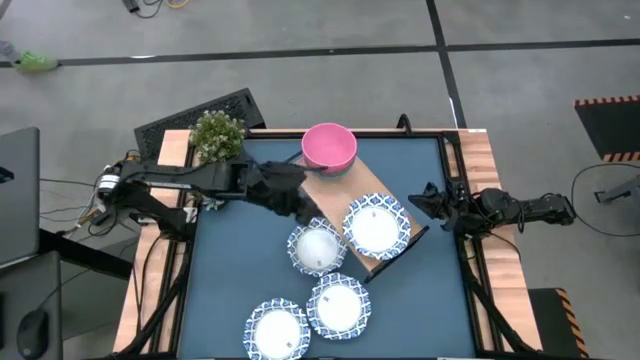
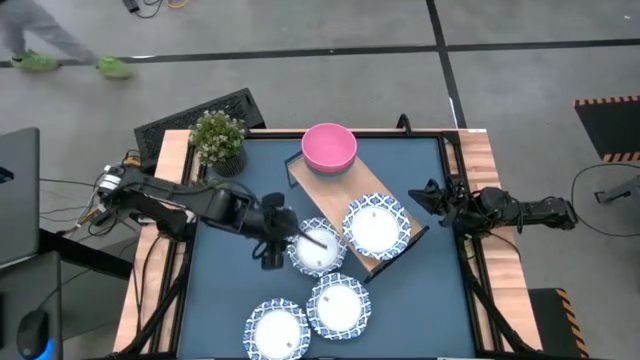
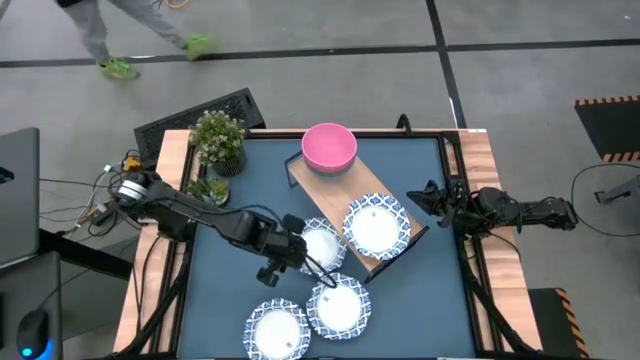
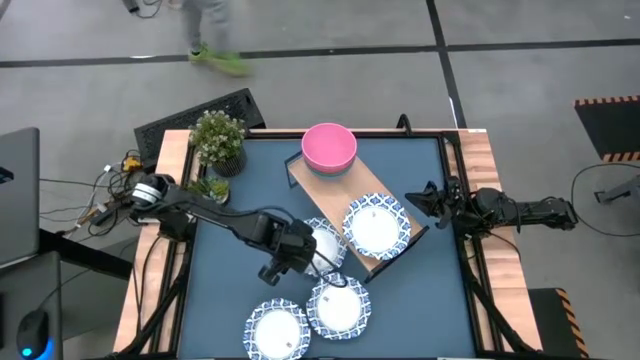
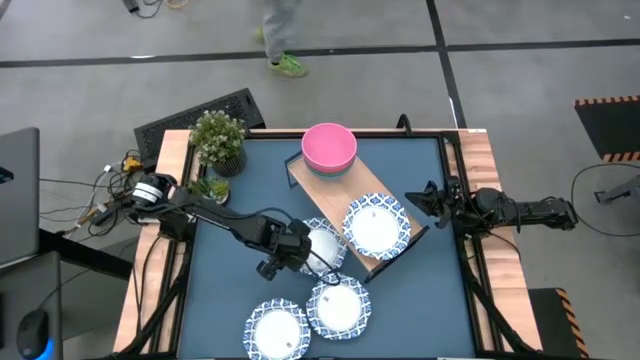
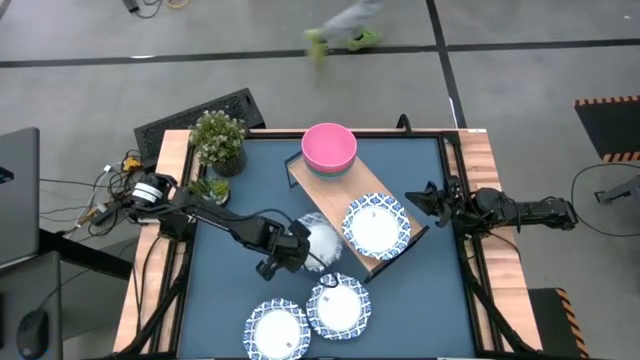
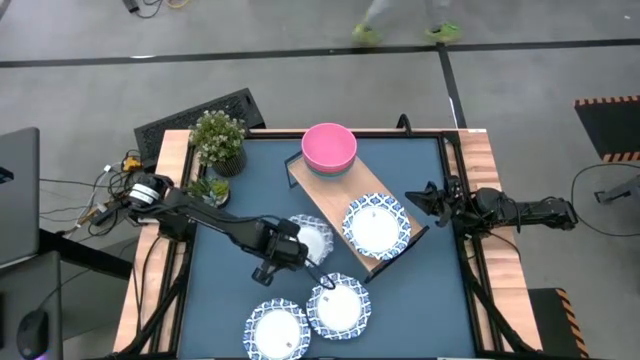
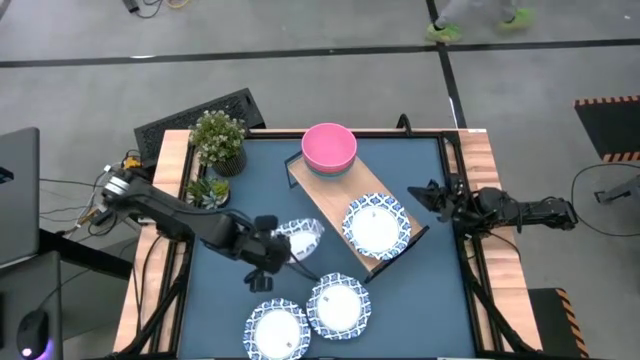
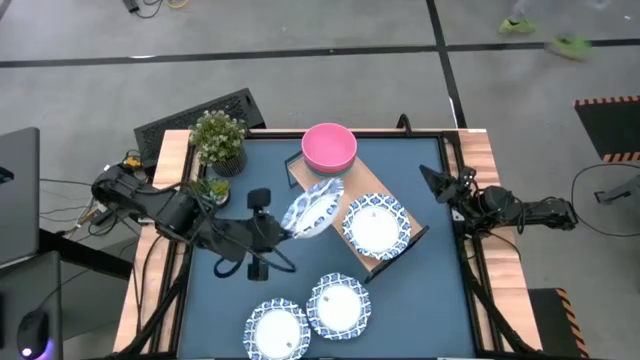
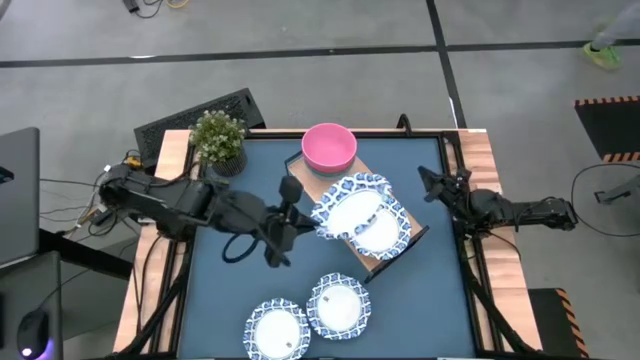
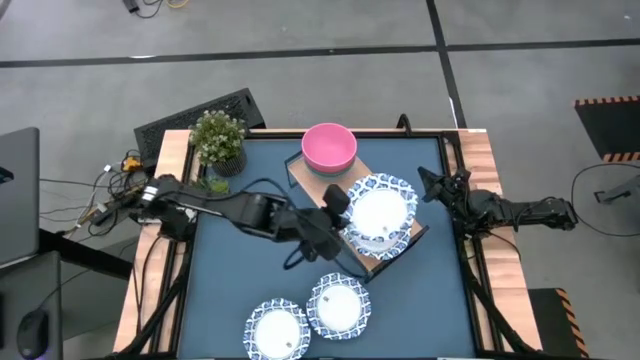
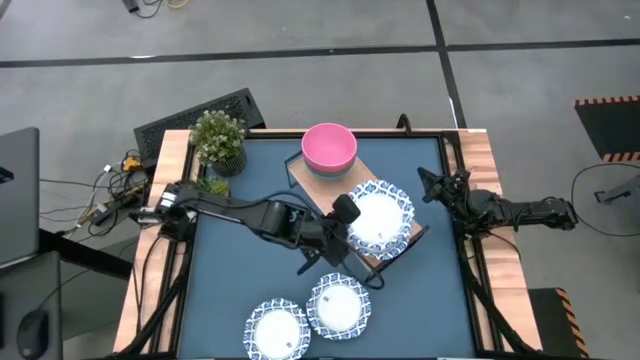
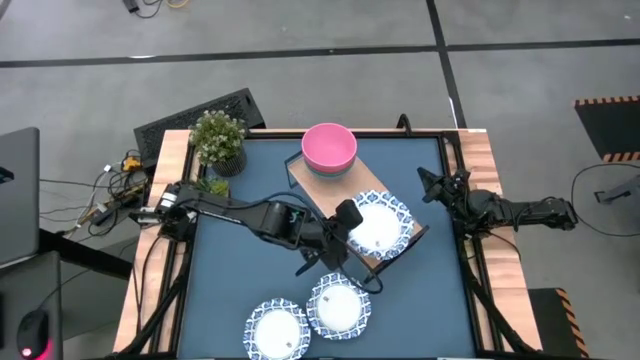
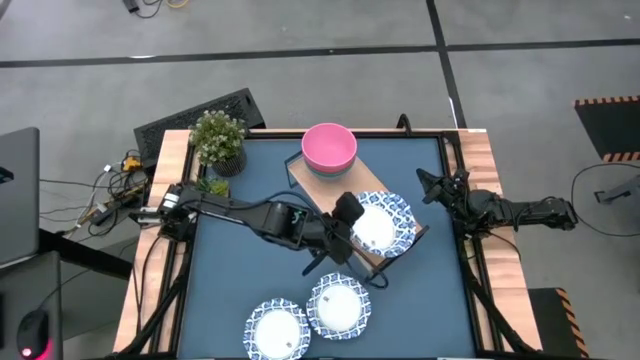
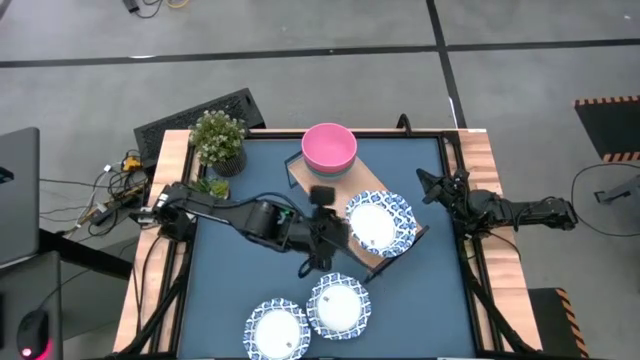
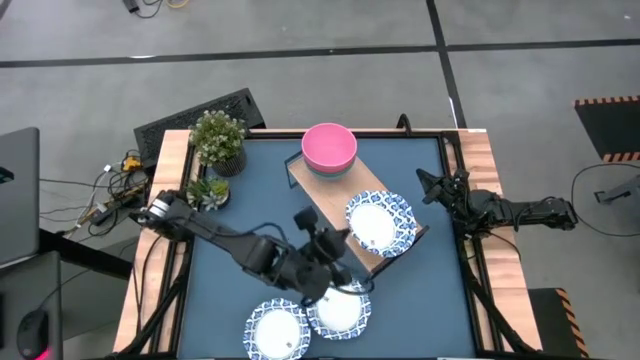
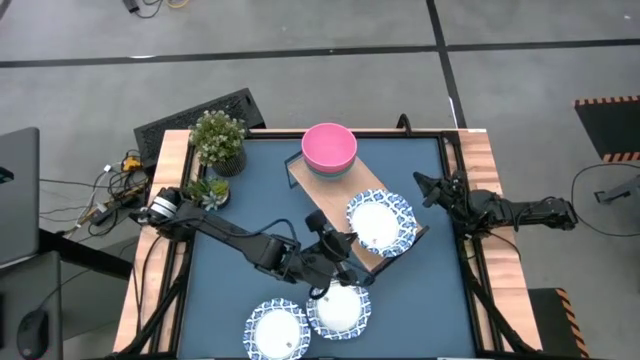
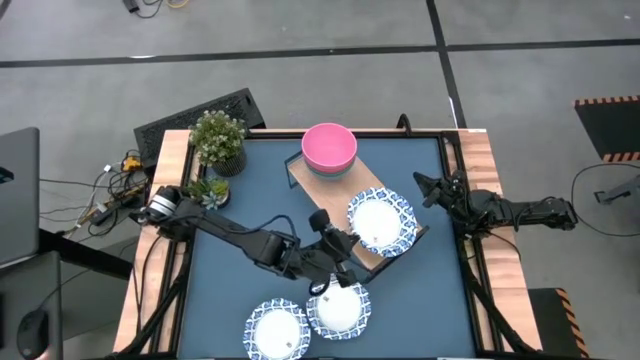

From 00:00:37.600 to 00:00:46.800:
Task: Place and stack plates onto a shelf
Stack the white and blue plate on the shelf

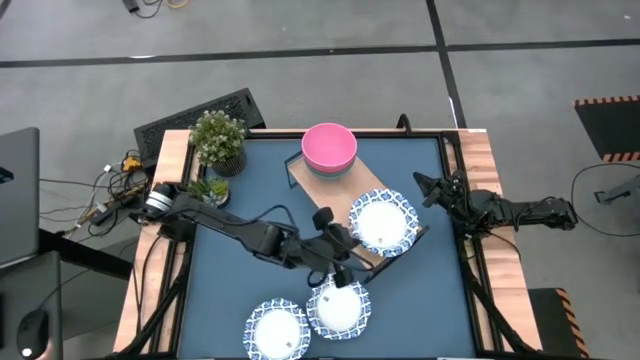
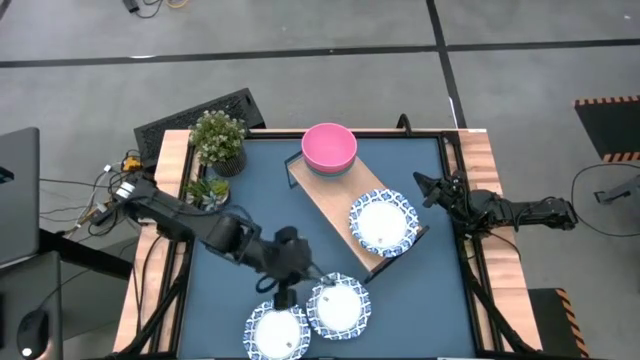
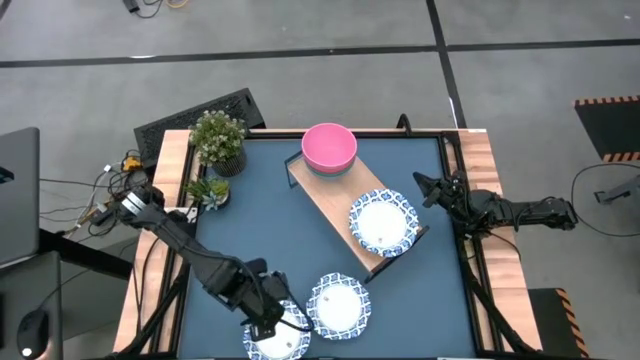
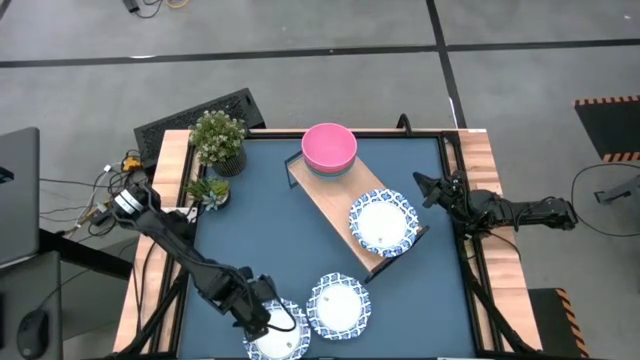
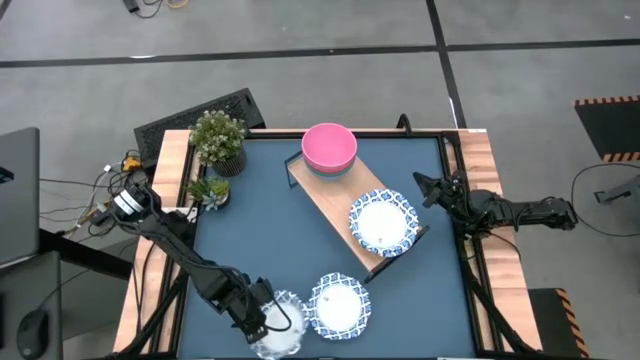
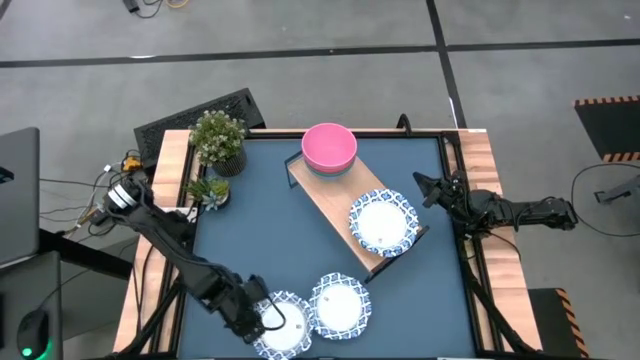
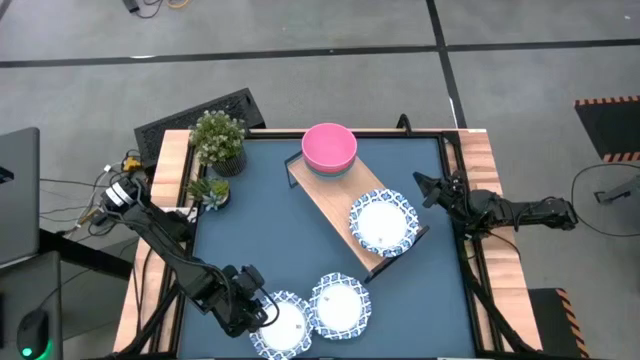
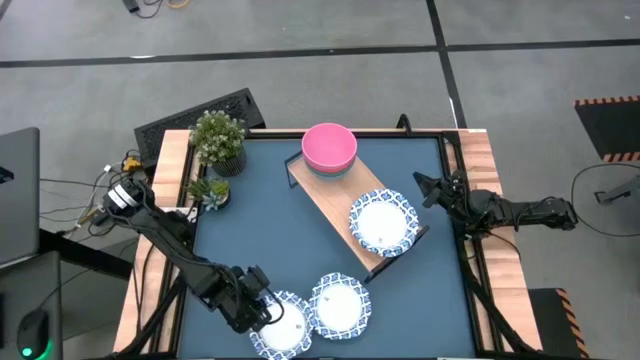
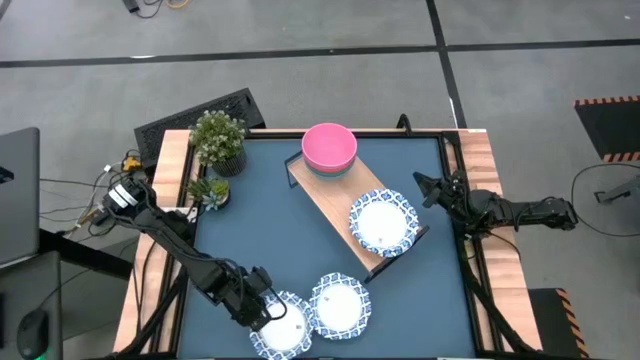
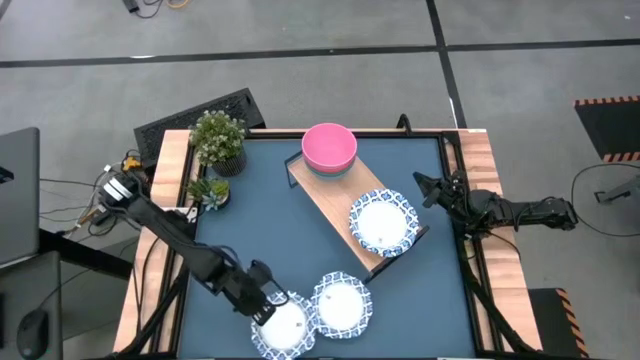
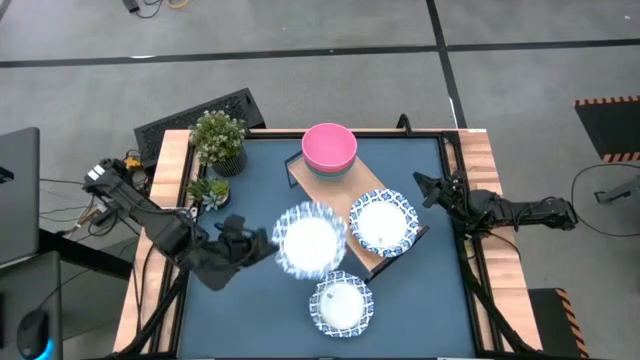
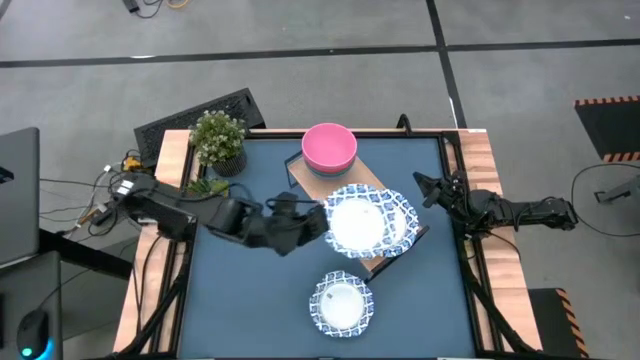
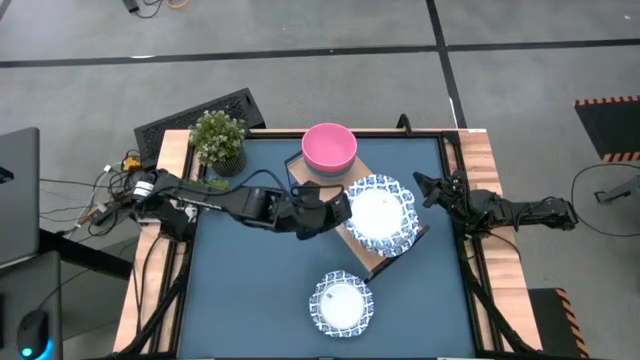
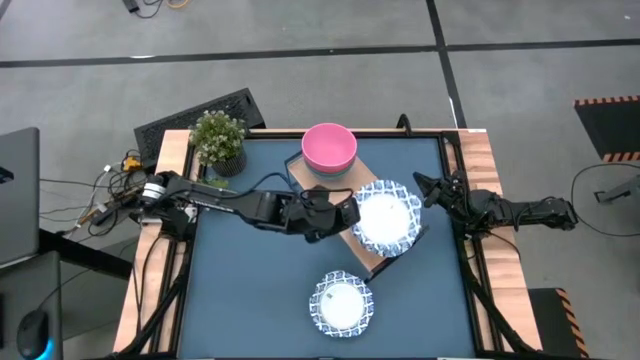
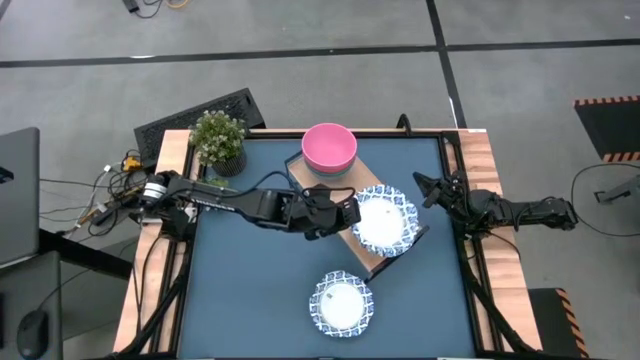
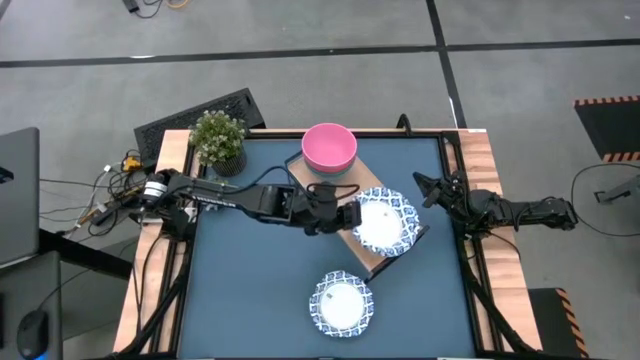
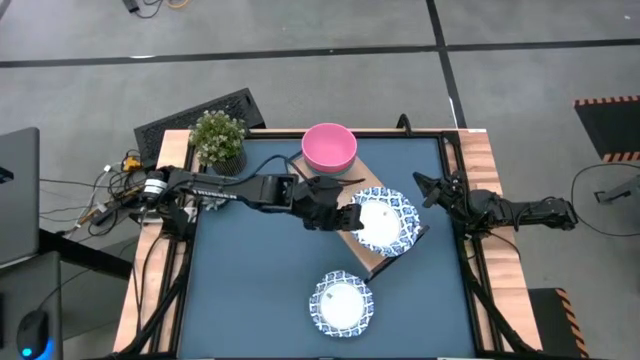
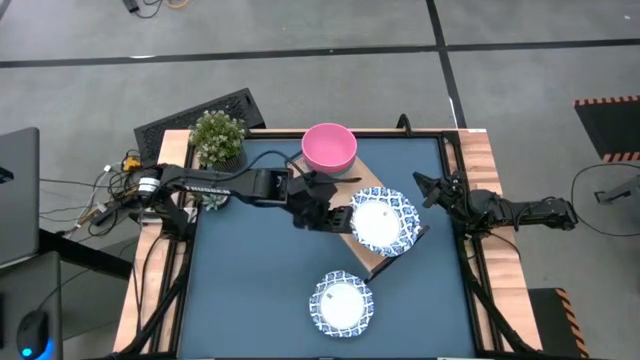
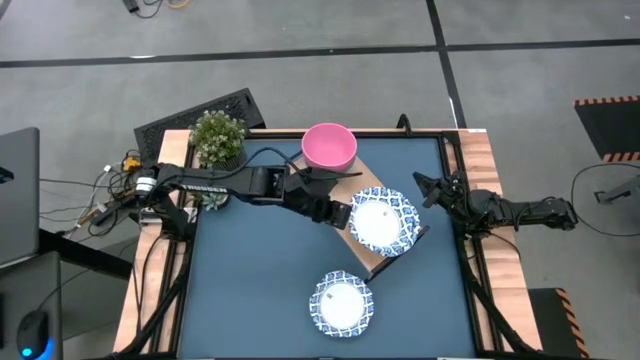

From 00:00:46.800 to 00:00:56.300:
Stack the white and blue plate on the shelf

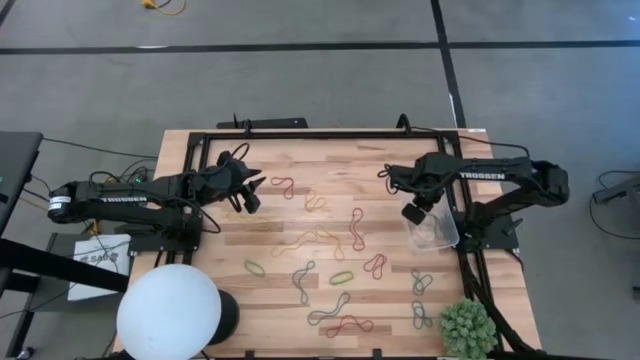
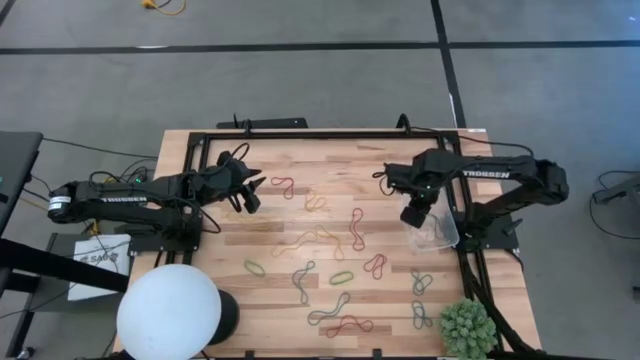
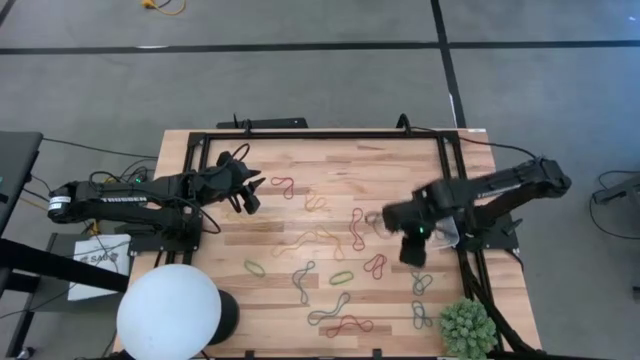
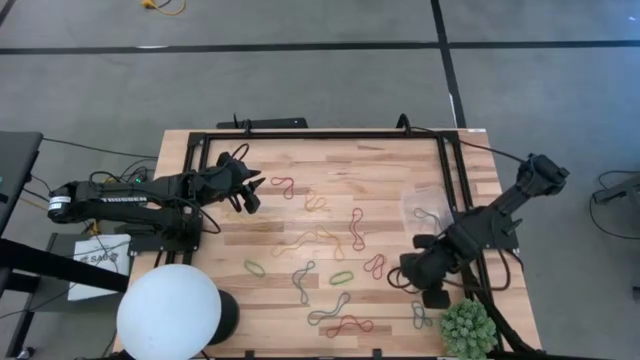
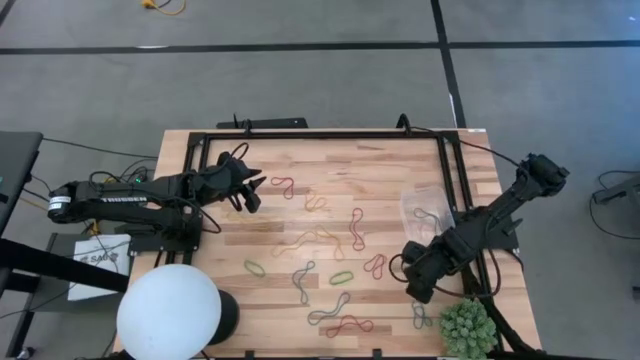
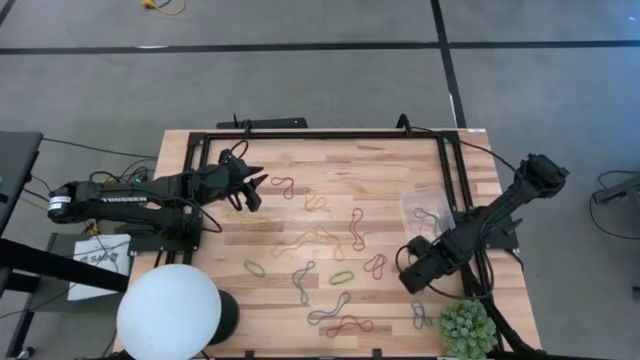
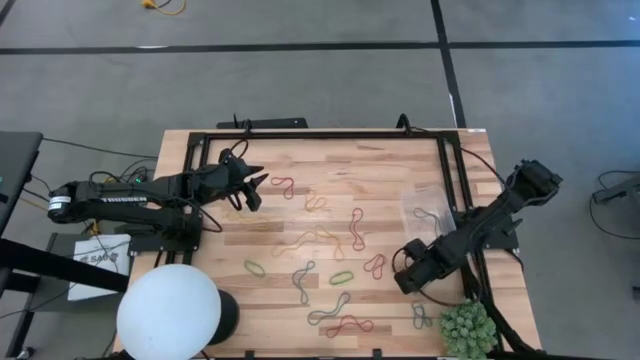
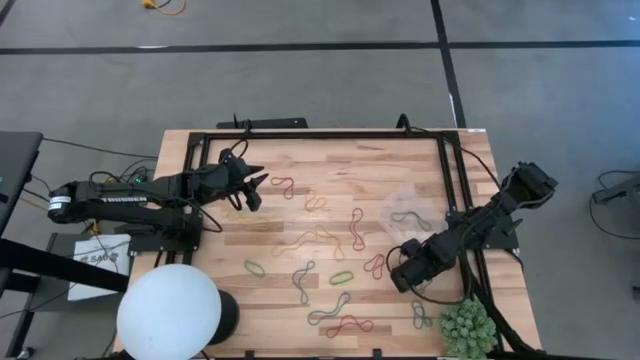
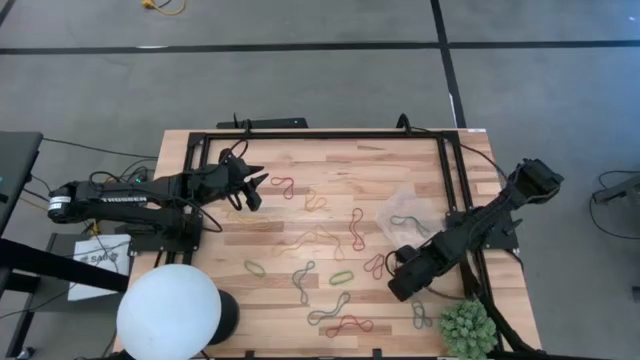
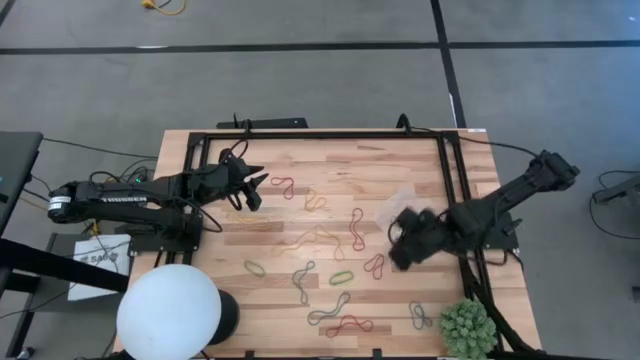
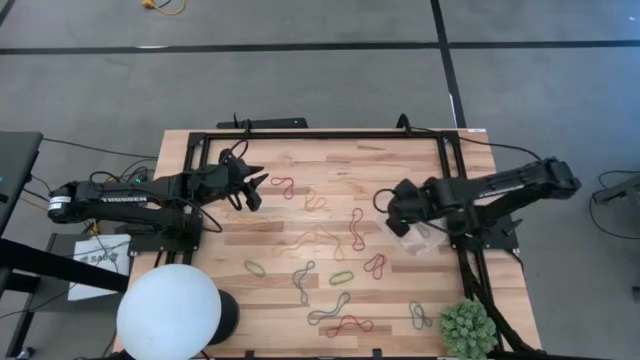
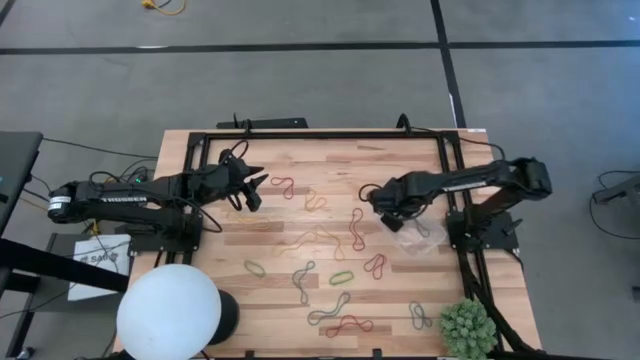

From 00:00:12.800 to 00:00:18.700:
Task: Pick and place items into bin
Put the blue rubber band into the transparent bin
